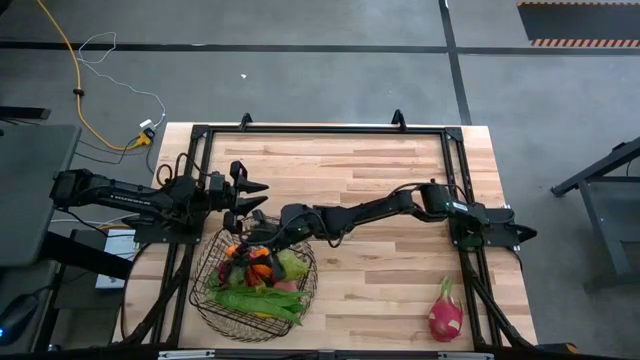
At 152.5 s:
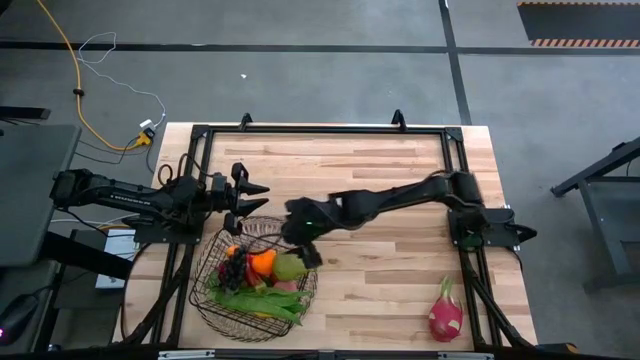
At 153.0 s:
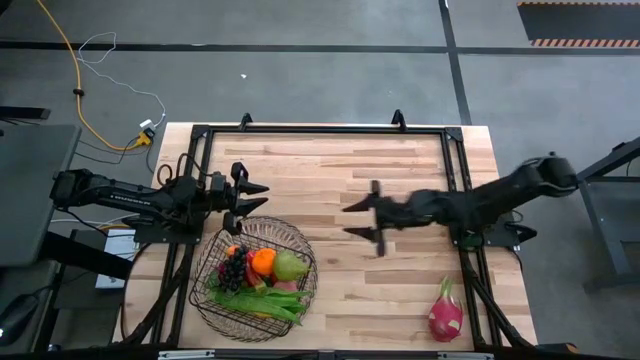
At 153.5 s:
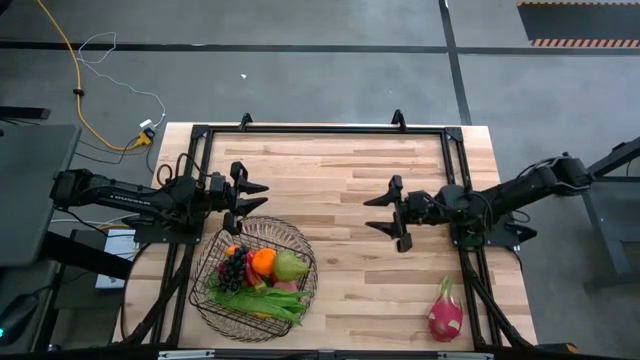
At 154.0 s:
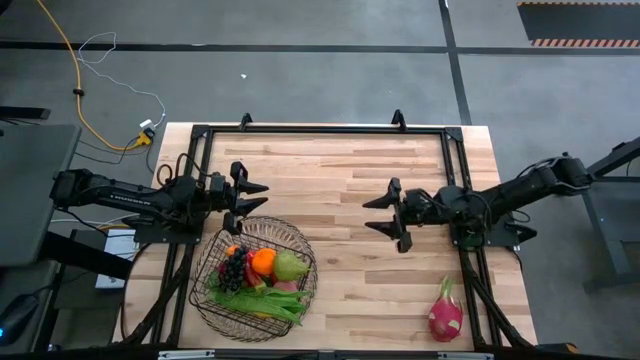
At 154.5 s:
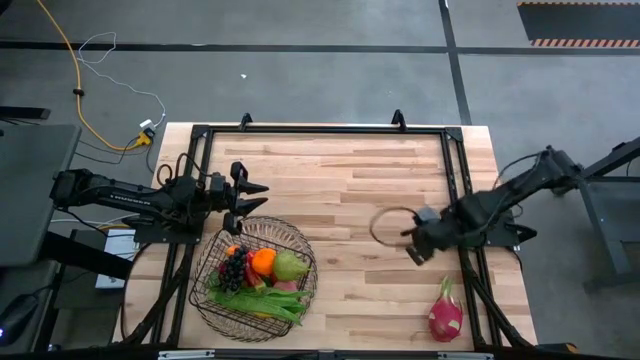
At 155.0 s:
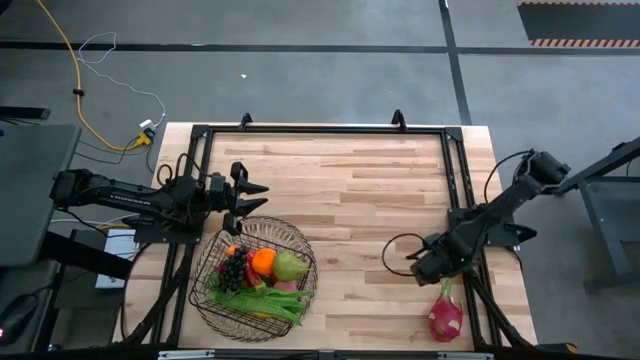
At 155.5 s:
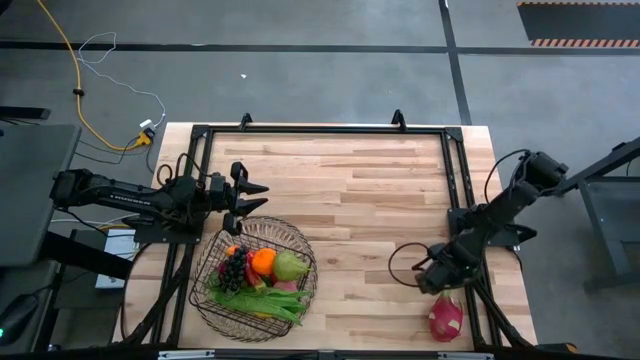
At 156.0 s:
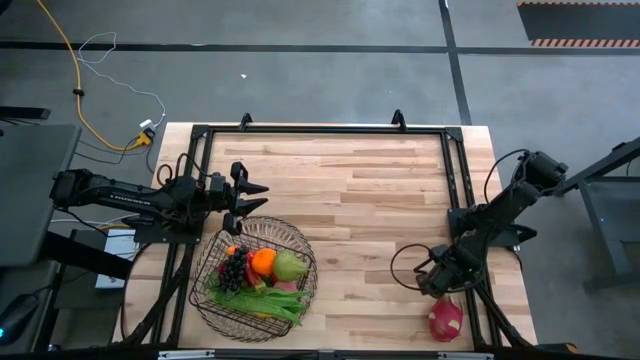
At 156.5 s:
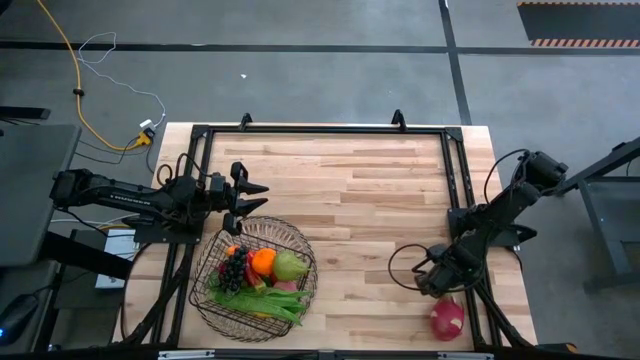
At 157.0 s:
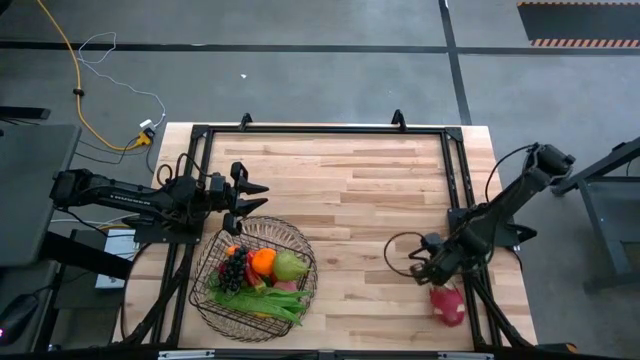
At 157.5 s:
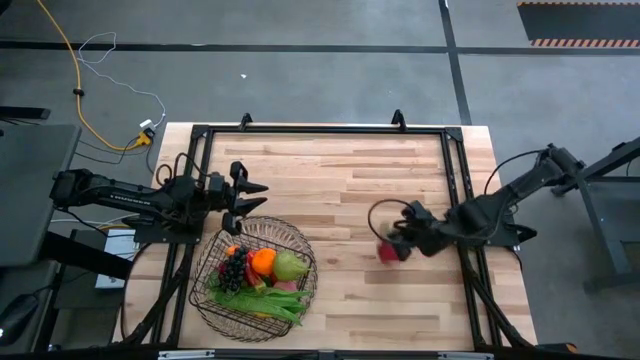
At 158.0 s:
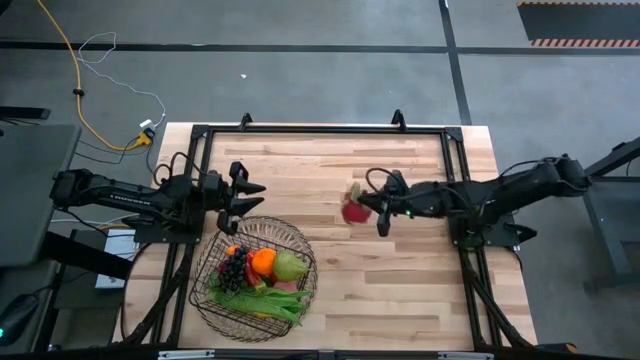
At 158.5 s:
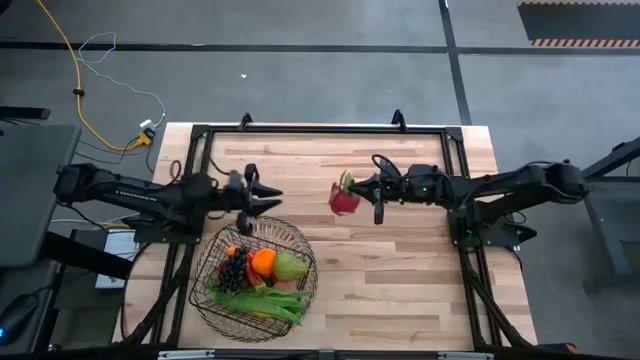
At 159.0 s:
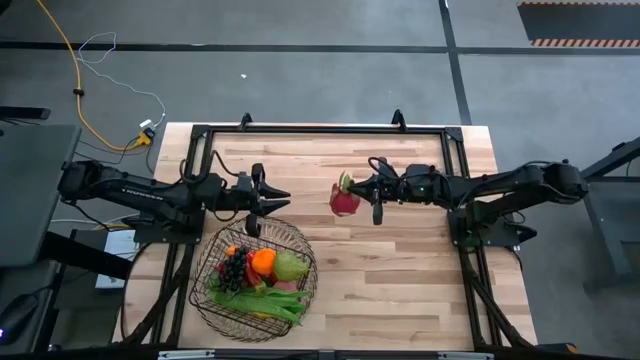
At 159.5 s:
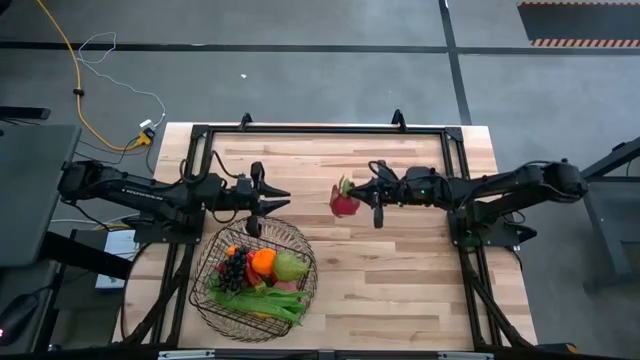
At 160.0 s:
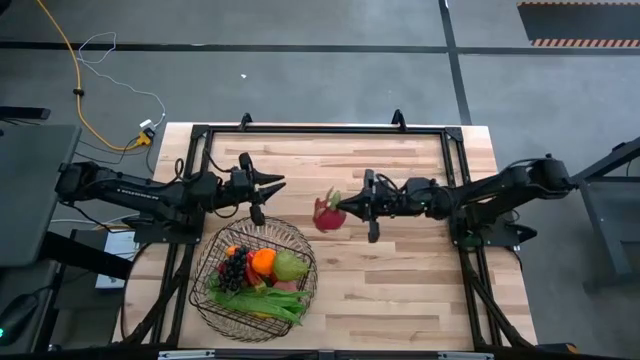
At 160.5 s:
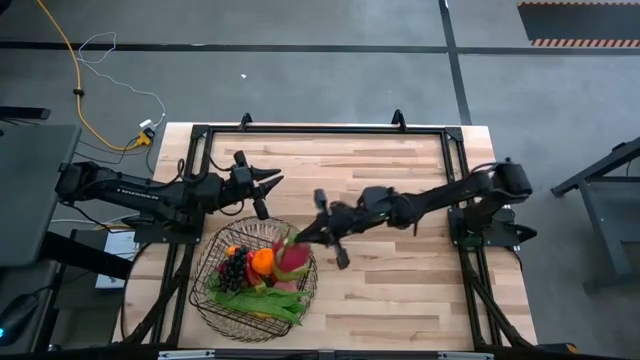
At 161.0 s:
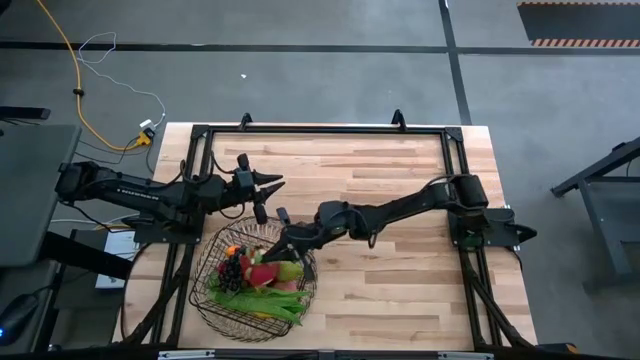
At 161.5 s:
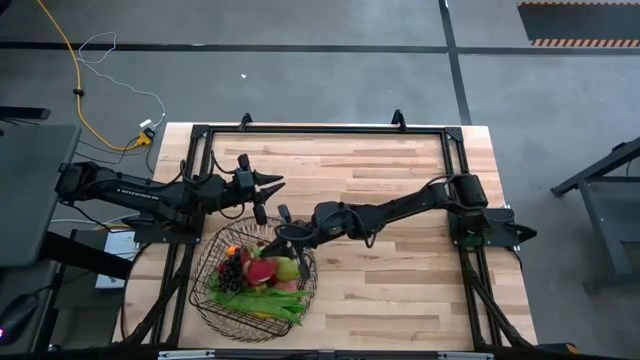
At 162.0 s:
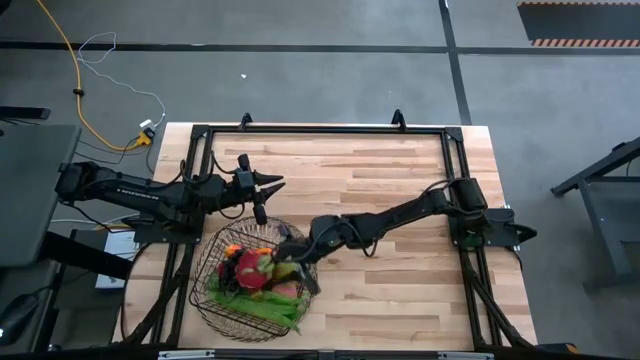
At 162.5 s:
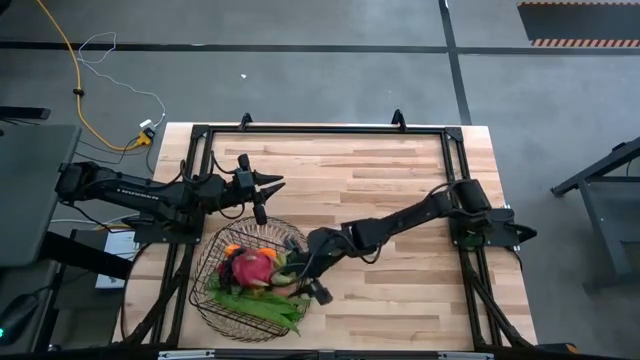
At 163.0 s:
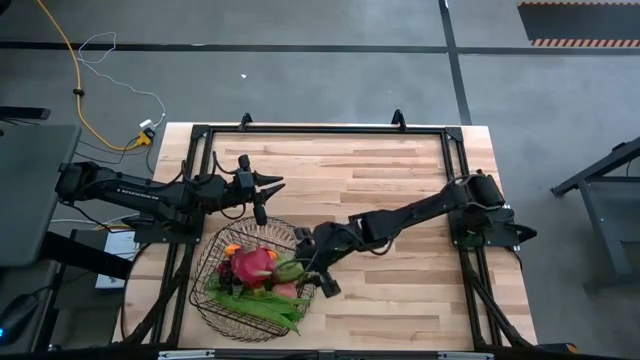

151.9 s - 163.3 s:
Task: Build produce basket
Put the pink dragonfruit into the black wire basket

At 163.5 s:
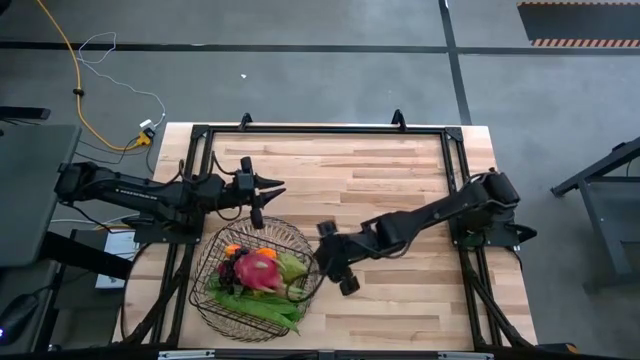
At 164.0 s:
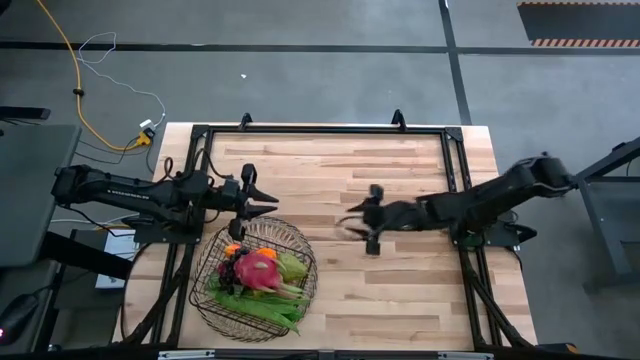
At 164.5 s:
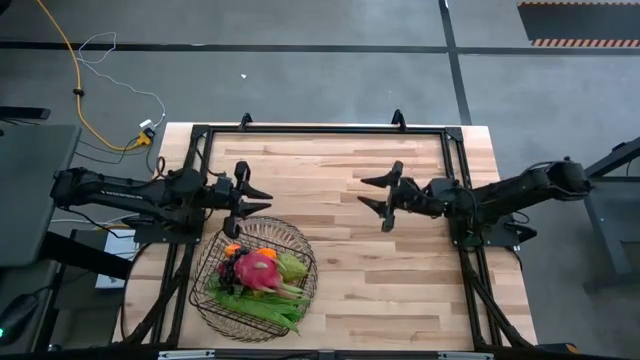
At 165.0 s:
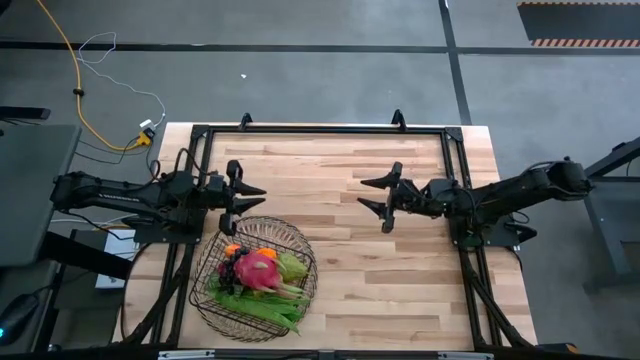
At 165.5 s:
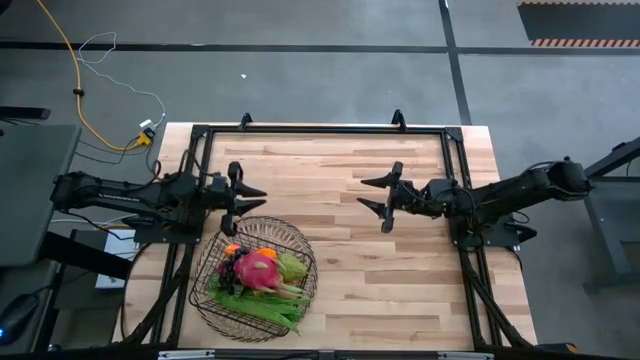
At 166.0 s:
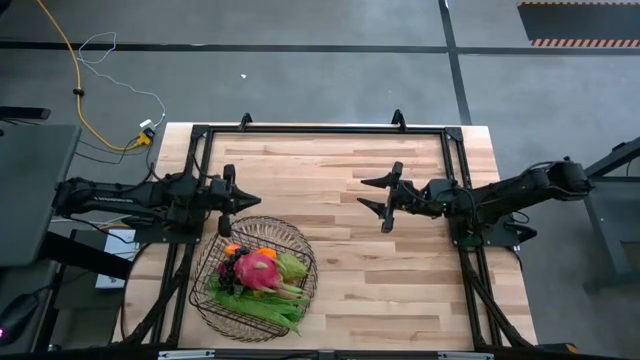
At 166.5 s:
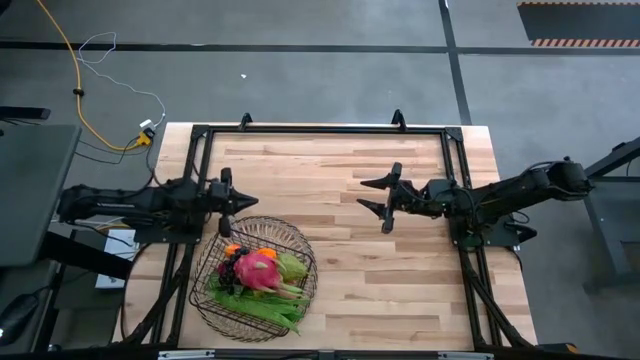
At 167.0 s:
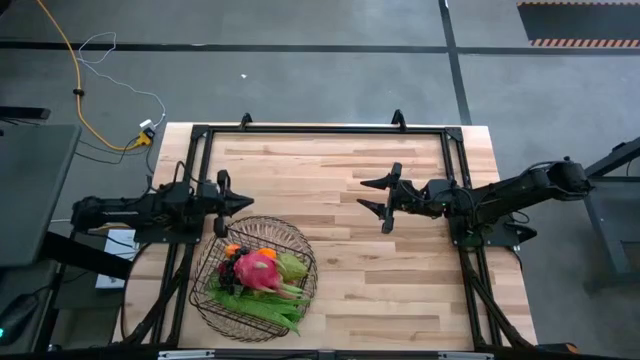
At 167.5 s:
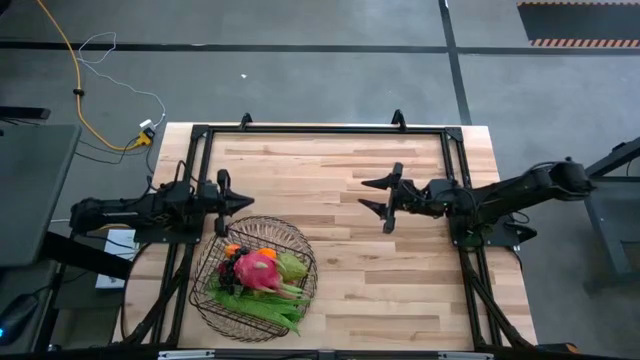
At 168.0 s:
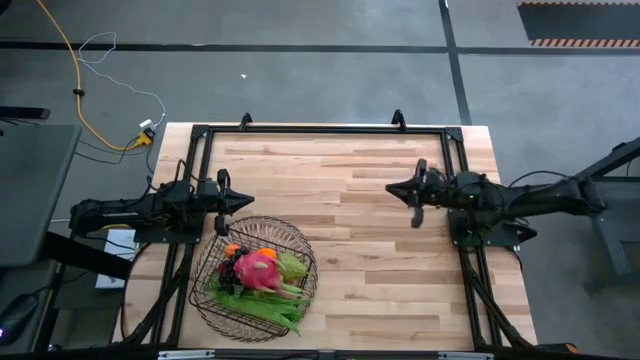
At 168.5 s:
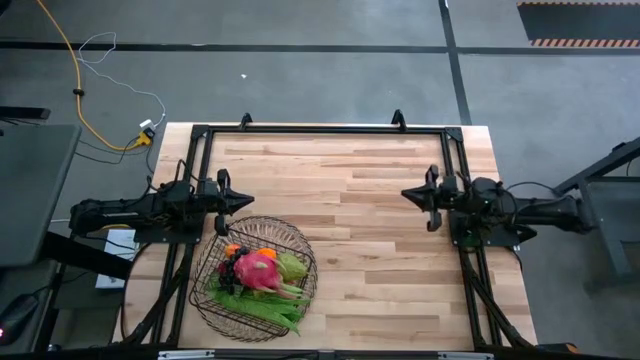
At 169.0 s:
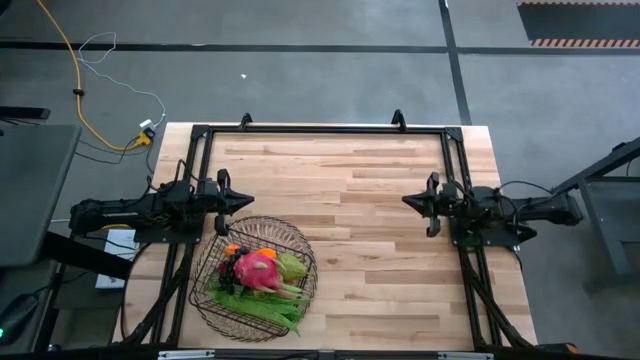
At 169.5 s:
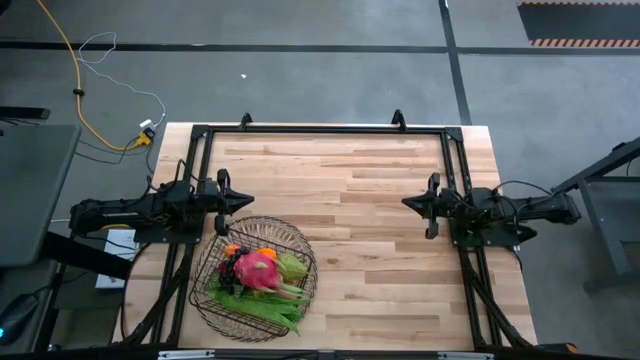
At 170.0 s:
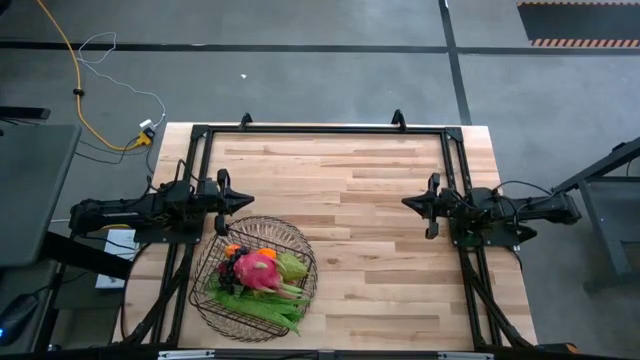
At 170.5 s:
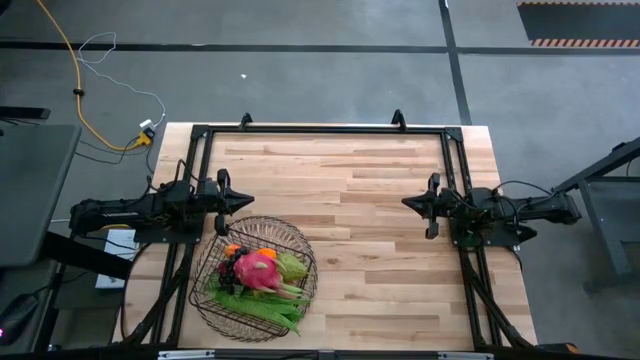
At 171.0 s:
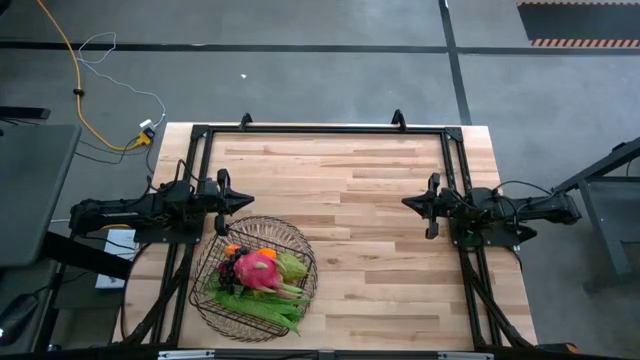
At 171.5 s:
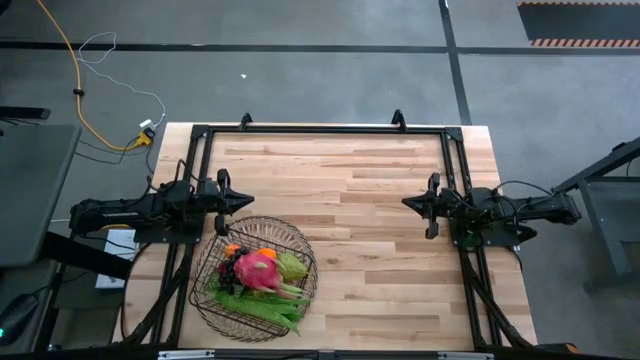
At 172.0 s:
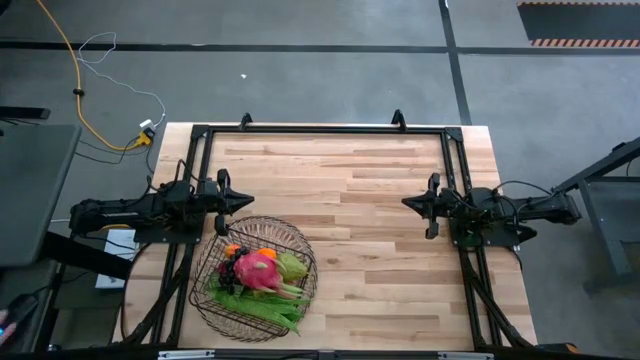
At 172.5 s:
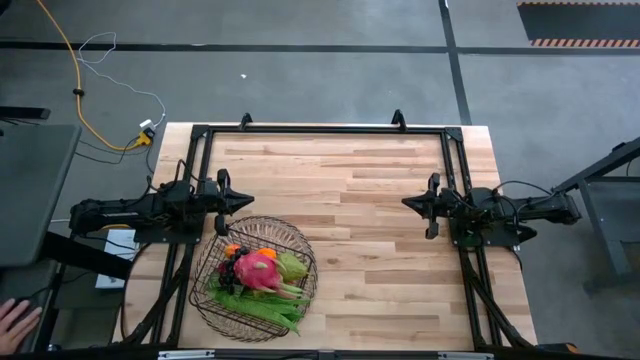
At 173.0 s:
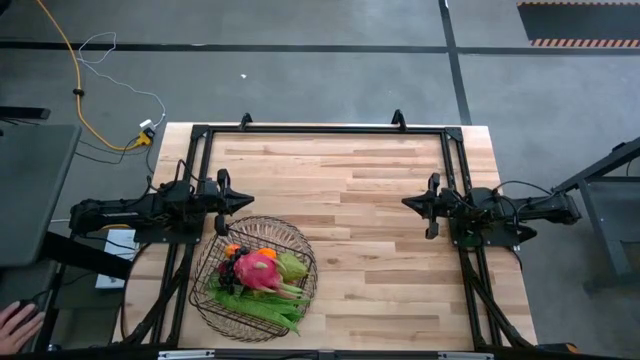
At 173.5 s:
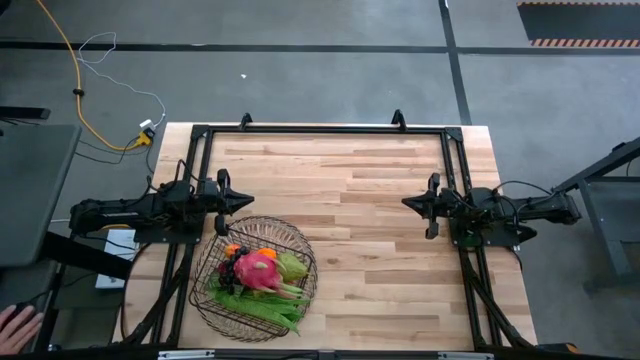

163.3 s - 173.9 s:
Return to Home Position
